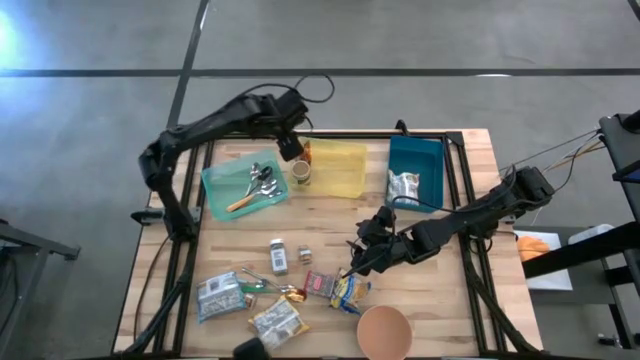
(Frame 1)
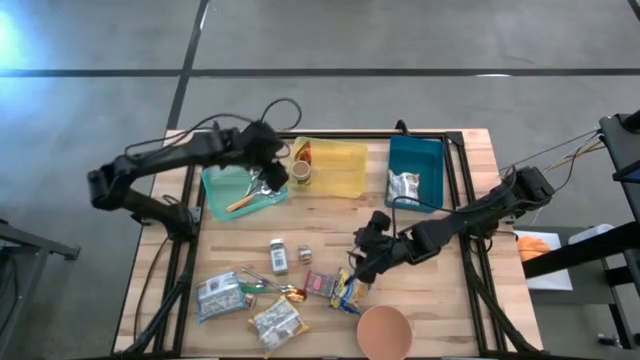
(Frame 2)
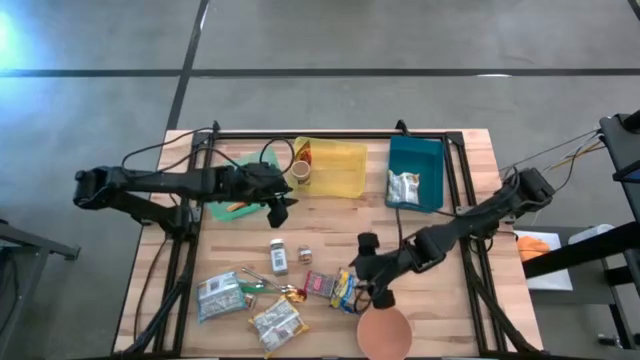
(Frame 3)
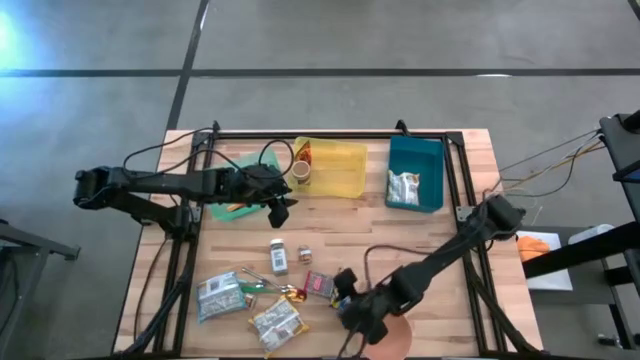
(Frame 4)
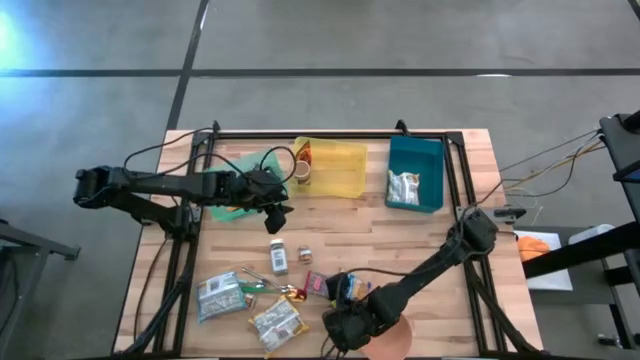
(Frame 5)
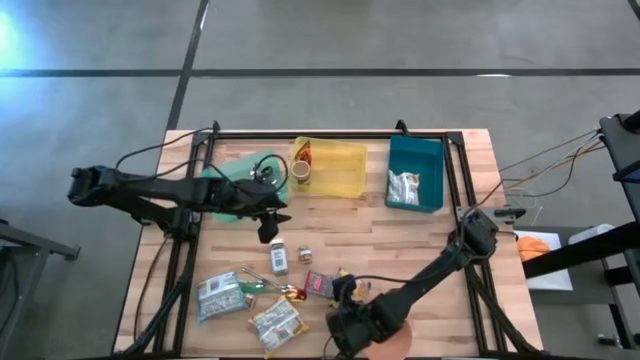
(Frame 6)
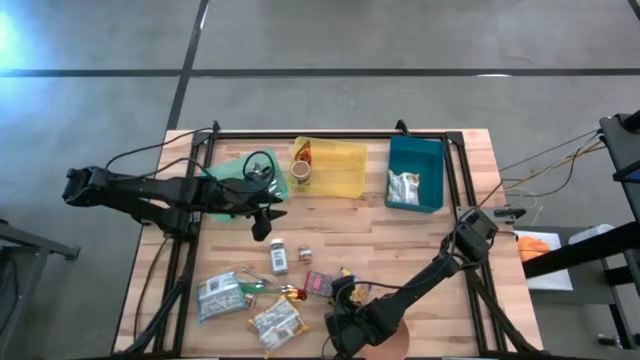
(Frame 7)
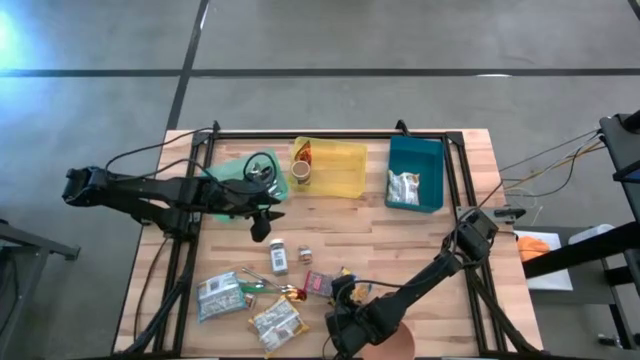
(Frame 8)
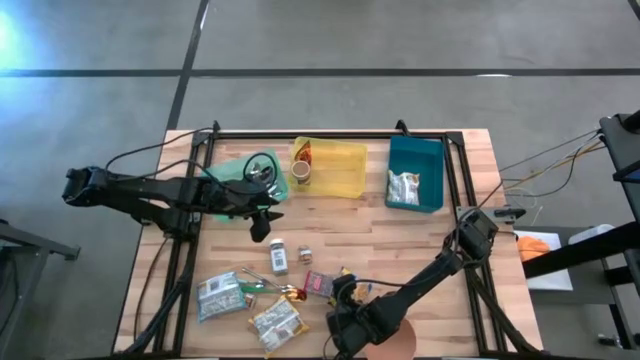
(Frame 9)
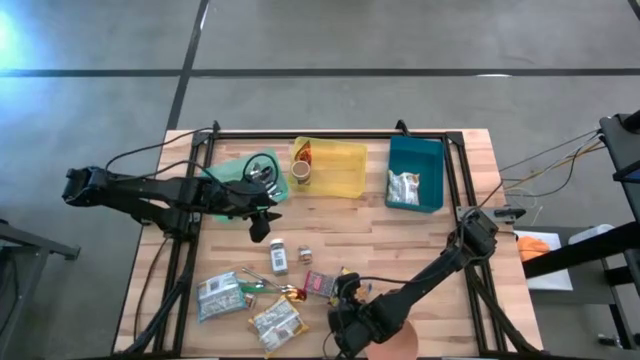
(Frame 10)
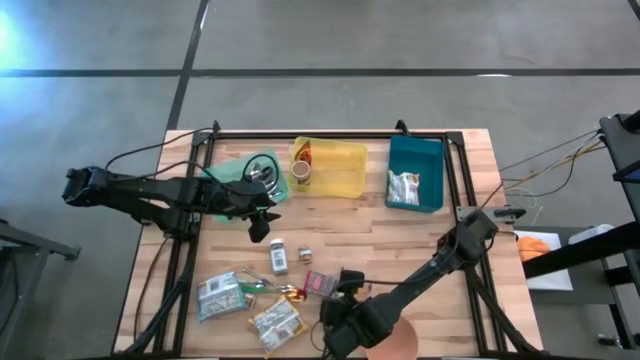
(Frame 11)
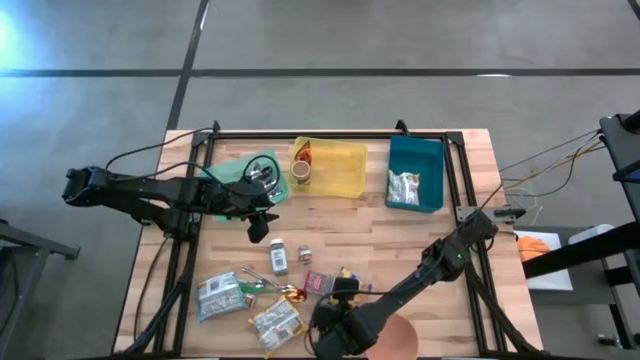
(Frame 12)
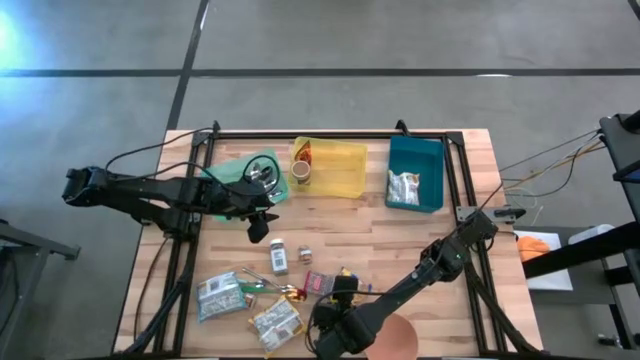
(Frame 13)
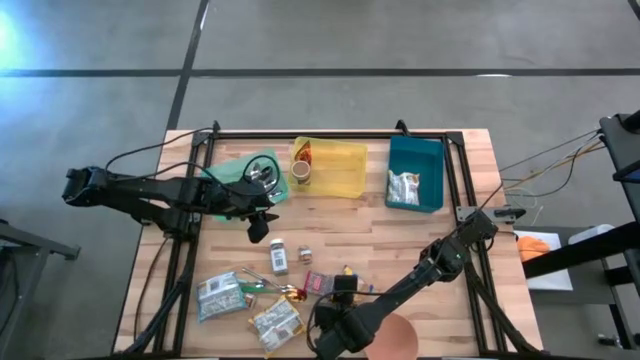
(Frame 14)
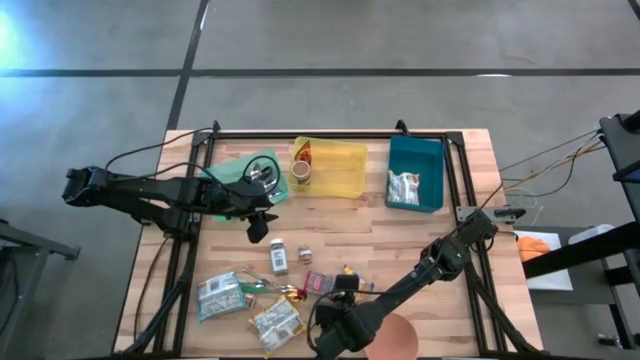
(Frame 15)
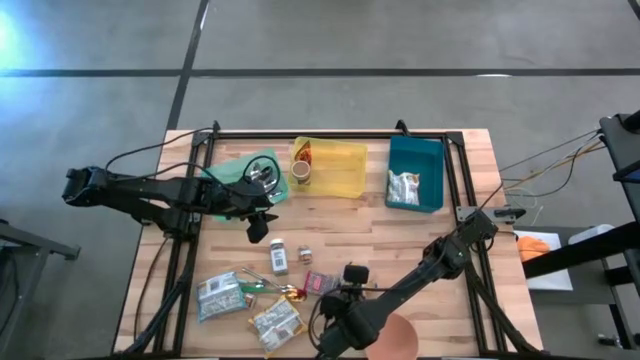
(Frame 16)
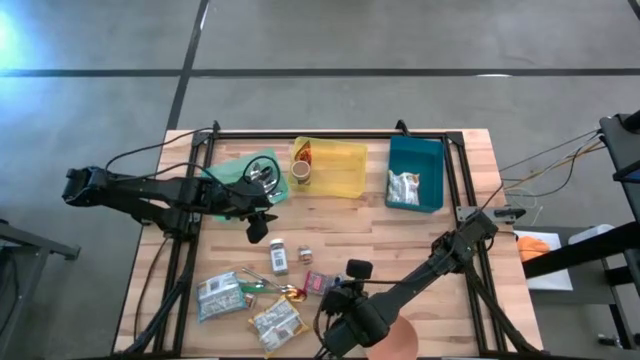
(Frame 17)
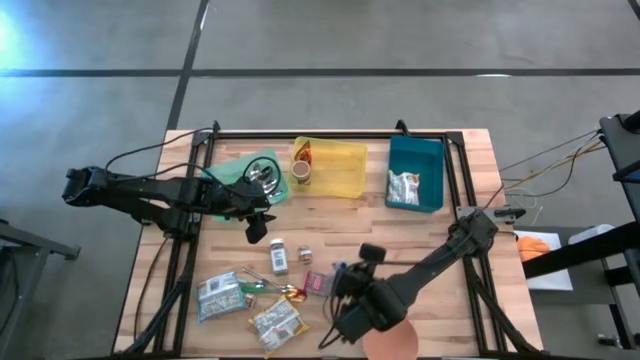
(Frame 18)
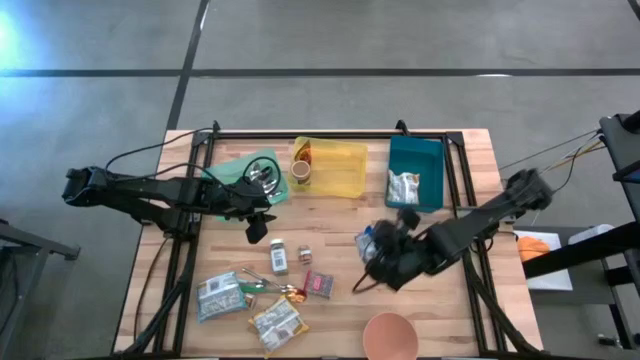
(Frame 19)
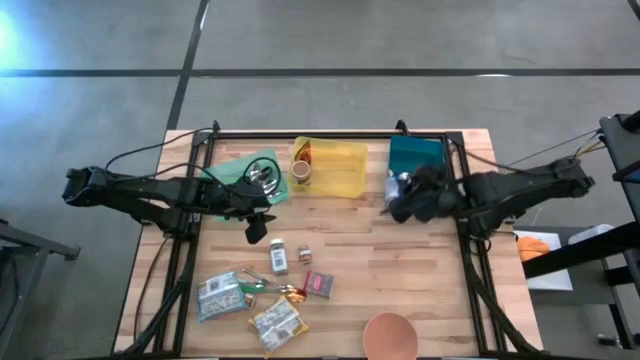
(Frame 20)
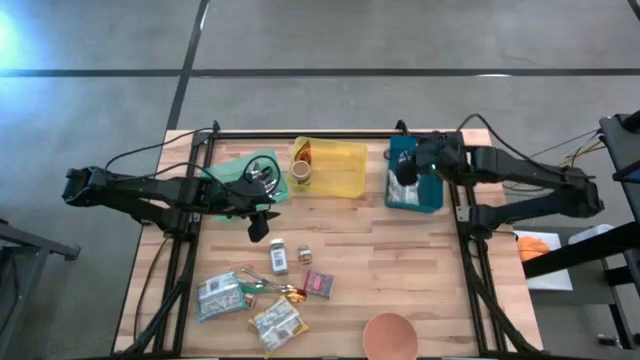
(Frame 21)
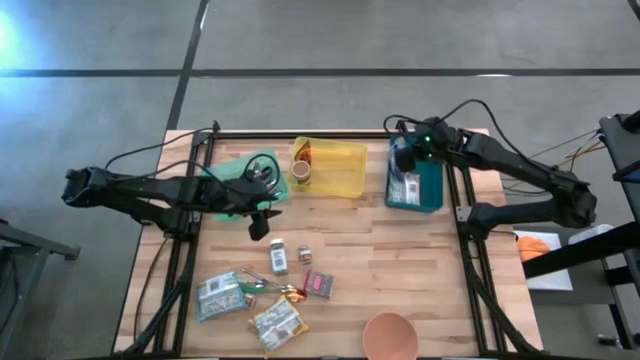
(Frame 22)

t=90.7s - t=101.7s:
Put the blue noodle pack into the blue bin
